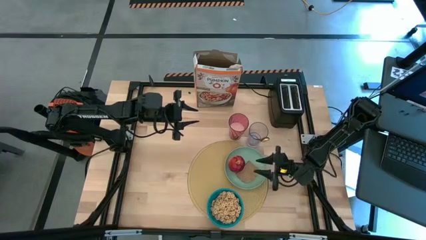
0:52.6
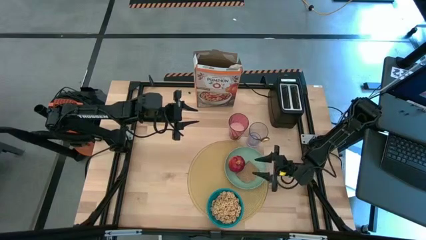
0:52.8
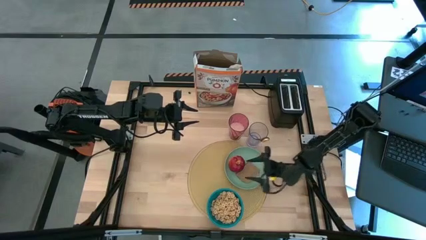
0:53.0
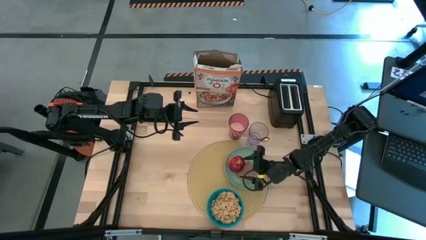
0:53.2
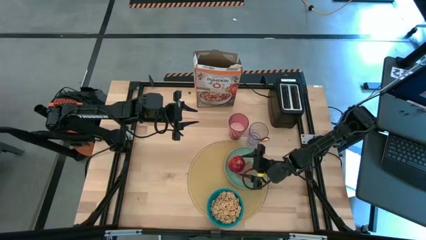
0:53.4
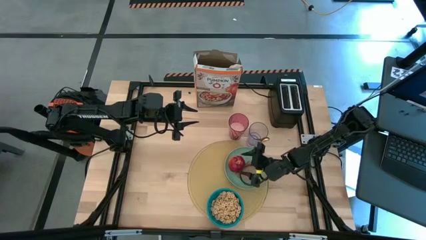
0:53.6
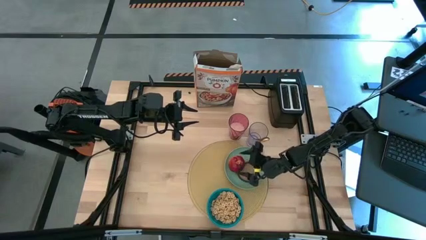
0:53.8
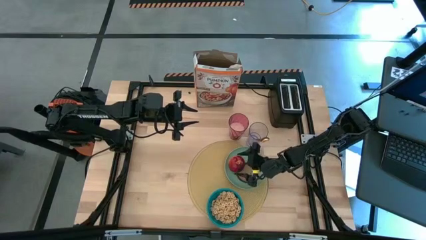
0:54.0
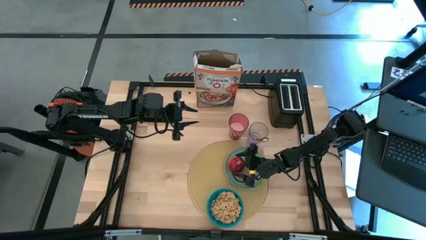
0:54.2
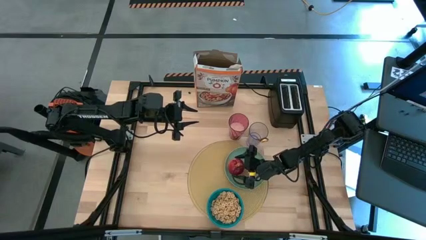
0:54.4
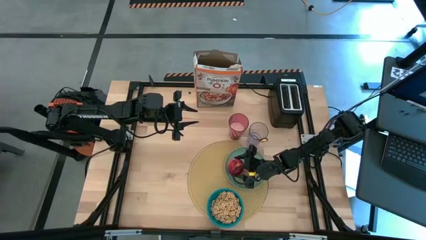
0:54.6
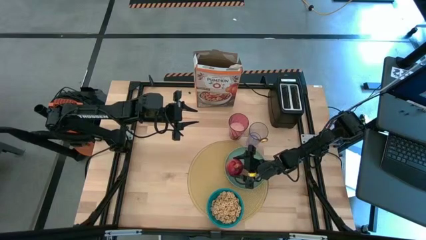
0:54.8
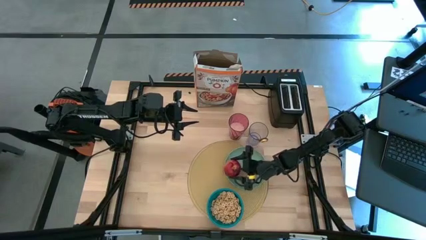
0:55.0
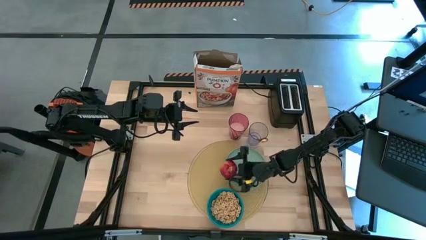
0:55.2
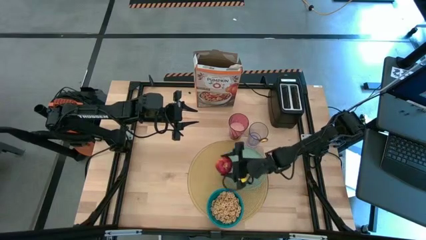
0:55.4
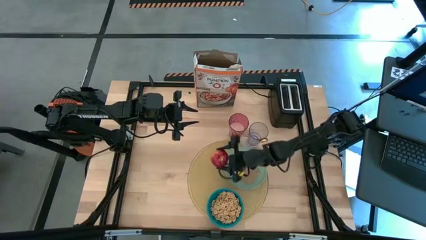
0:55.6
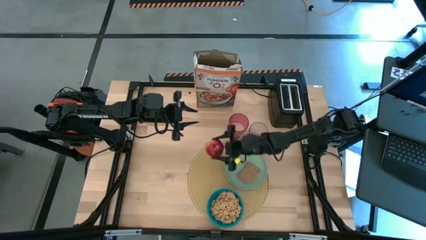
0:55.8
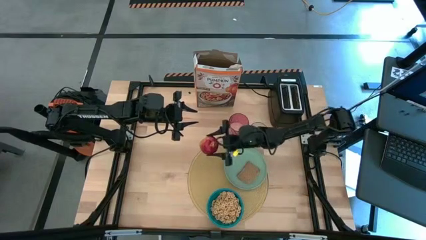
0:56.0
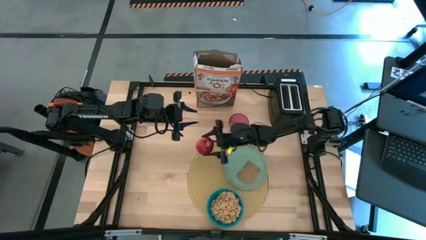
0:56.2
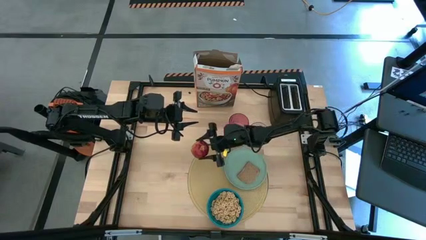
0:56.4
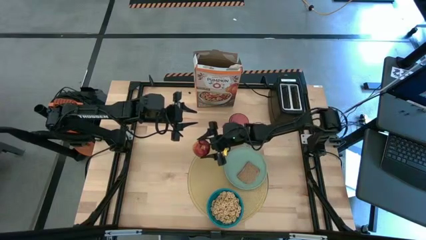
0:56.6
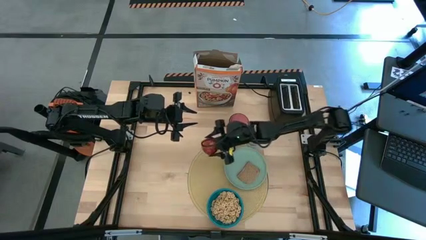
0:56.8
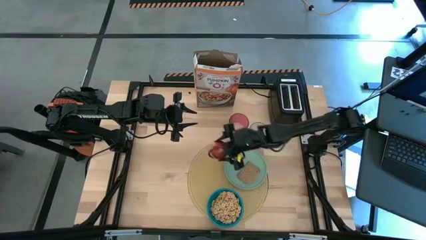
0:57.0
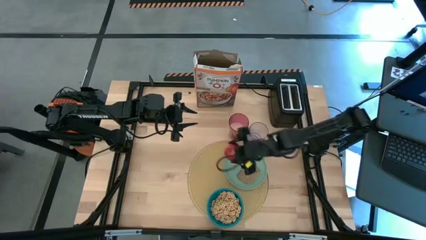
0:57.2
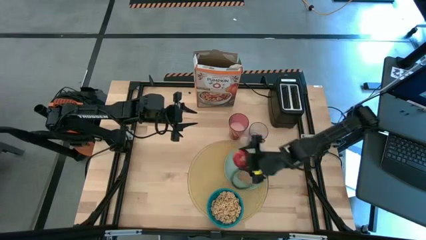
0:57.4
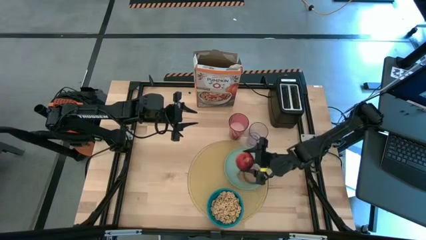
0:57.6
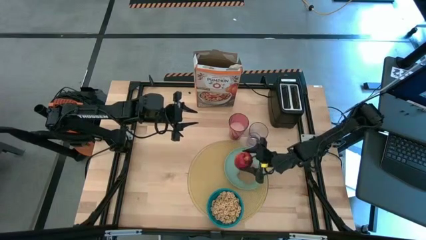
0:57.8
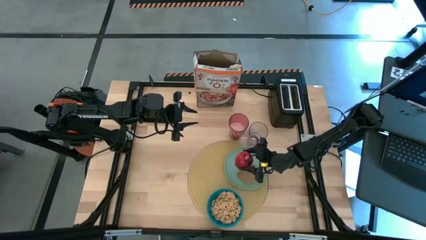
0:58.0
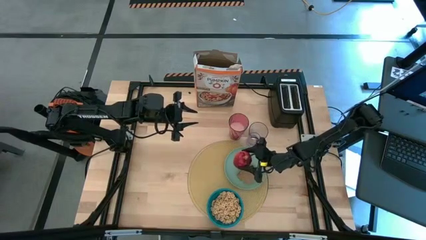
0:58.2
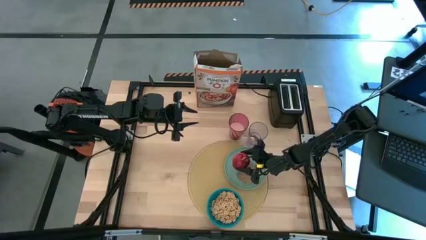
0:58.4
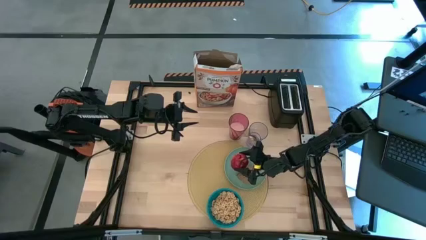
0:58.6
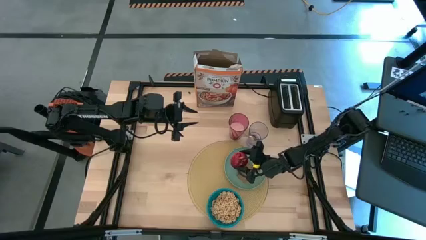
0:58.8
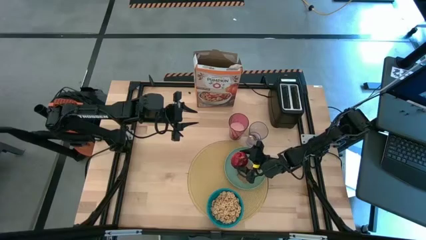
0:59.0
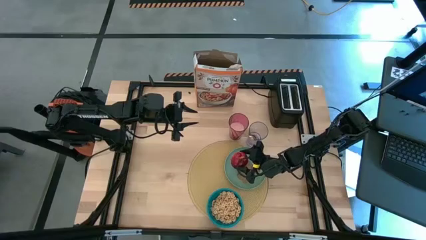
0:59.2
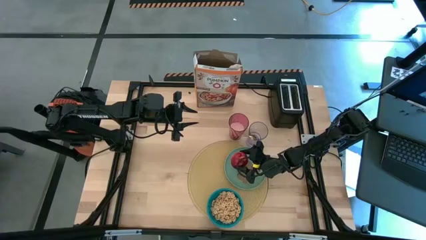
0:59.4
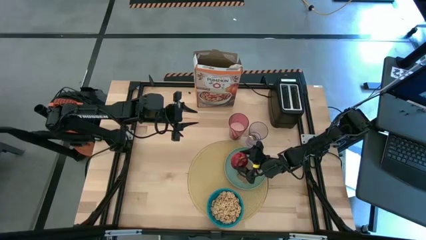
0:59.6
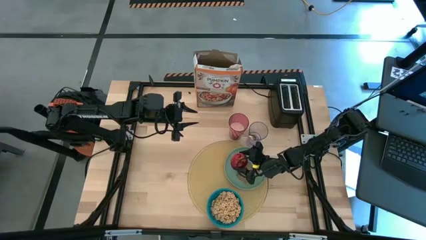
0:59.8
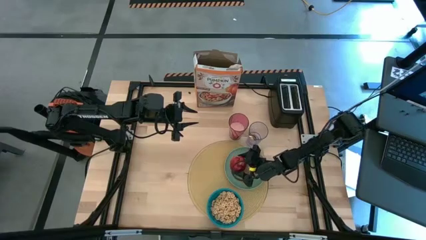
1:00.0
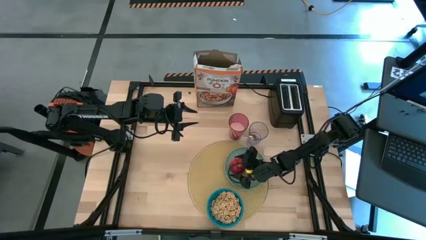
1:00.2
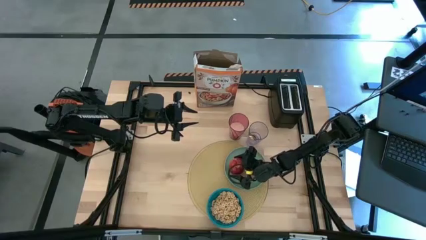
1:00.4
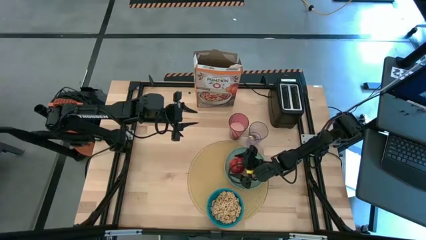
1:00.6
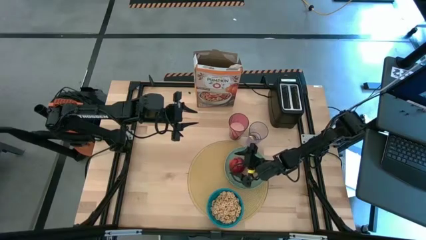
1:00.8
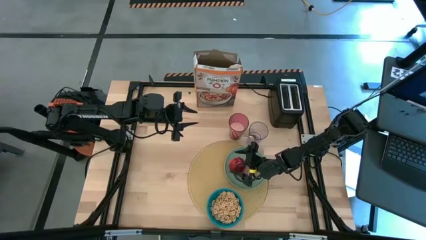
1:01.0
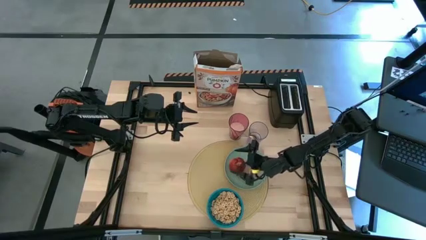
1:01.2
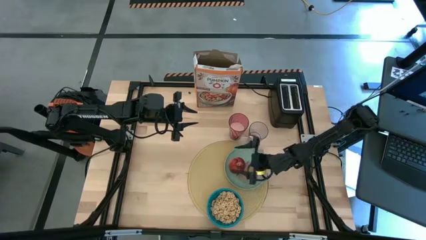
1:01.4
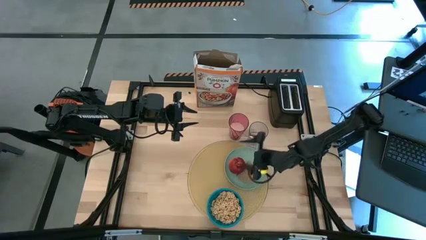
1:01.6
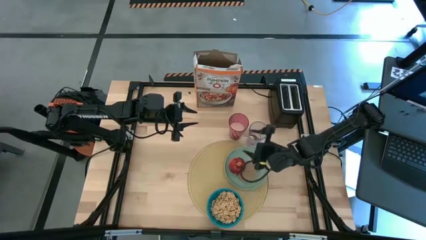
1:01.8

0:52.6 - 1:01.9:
Task: Arrange a breakfast setting
Adjust the apple on the plate

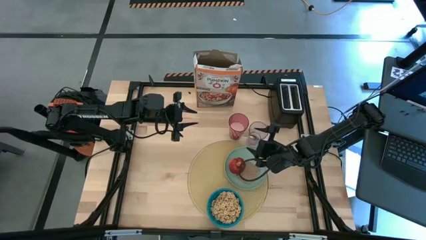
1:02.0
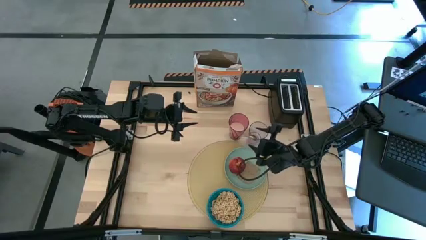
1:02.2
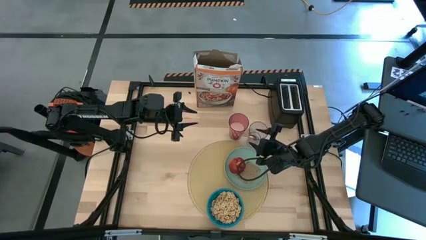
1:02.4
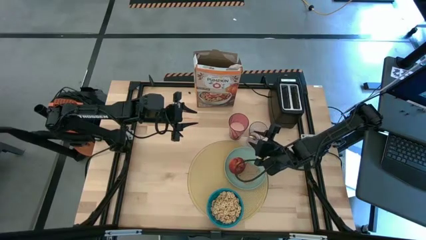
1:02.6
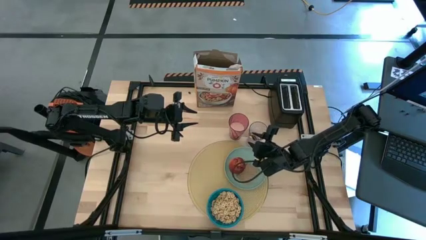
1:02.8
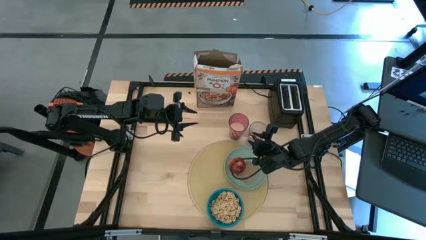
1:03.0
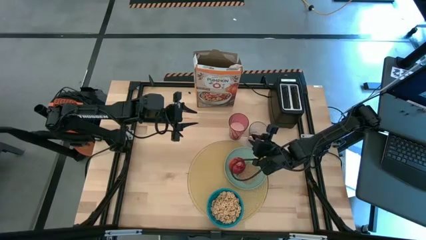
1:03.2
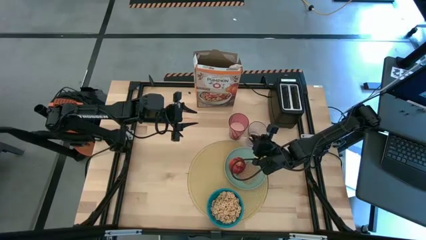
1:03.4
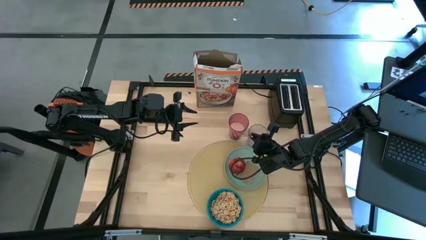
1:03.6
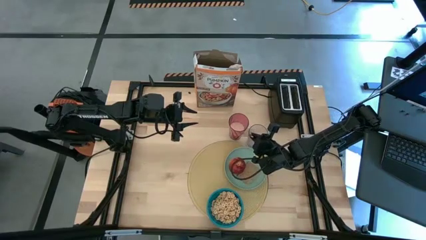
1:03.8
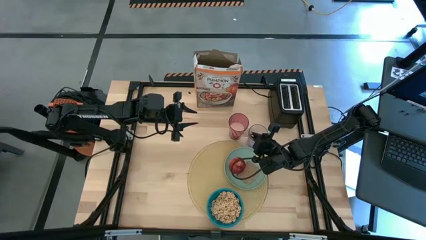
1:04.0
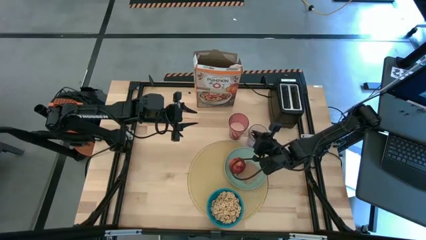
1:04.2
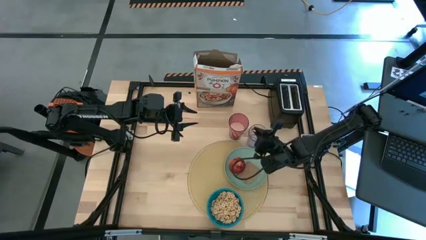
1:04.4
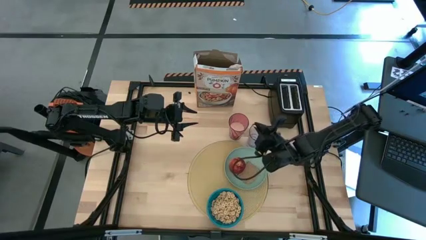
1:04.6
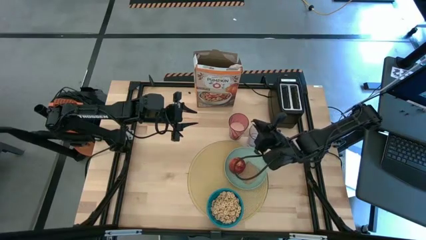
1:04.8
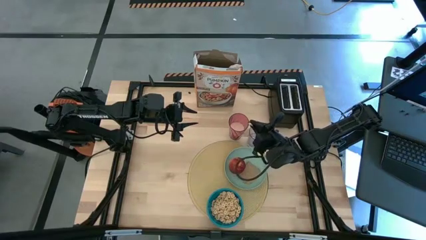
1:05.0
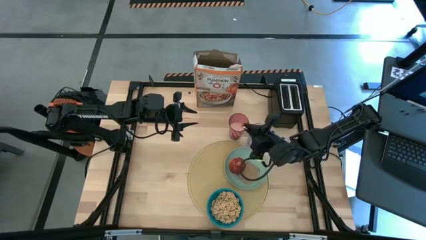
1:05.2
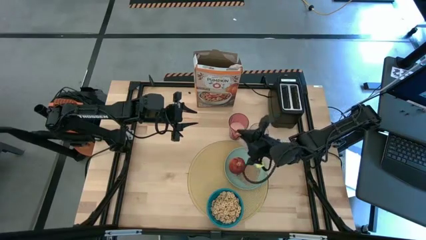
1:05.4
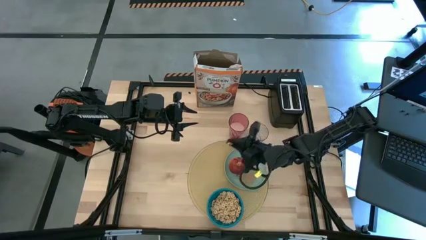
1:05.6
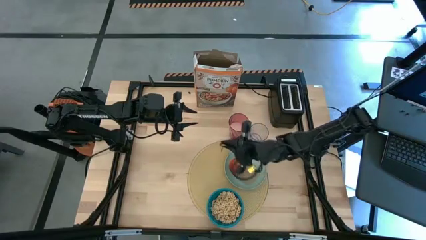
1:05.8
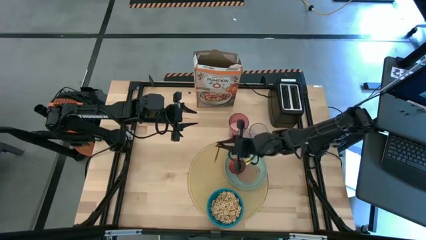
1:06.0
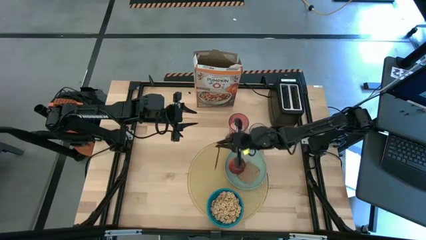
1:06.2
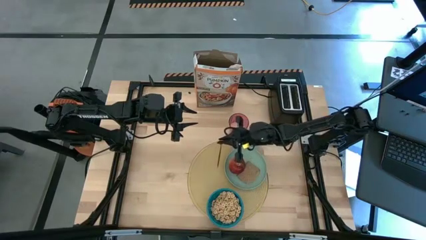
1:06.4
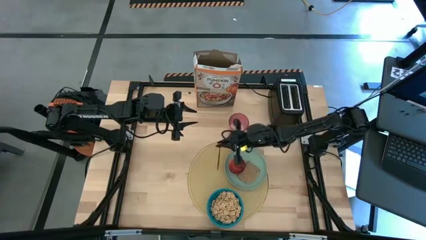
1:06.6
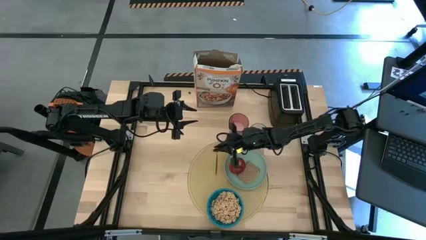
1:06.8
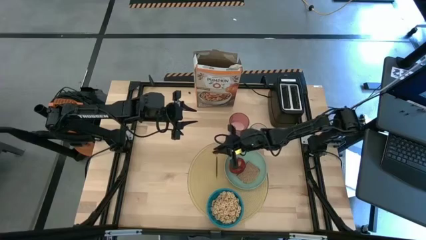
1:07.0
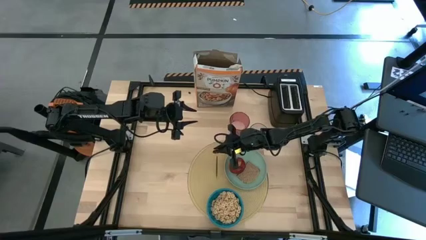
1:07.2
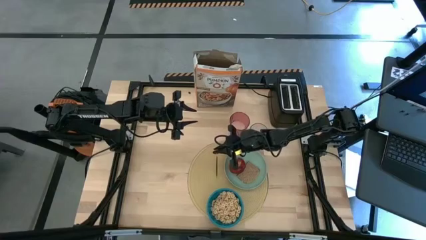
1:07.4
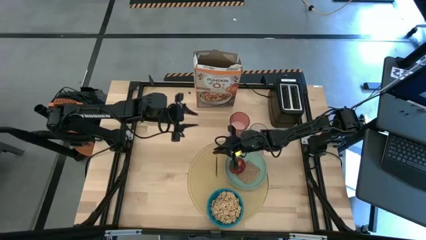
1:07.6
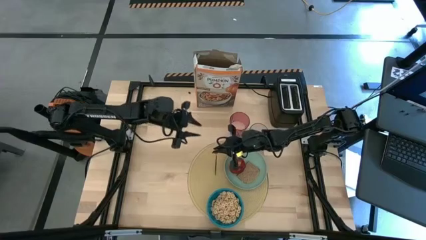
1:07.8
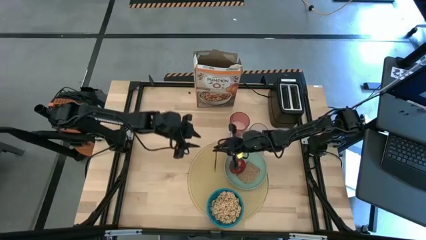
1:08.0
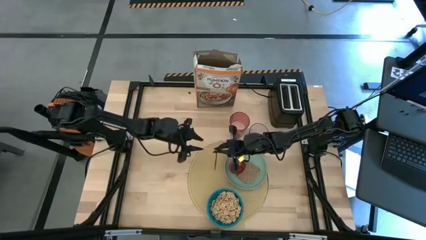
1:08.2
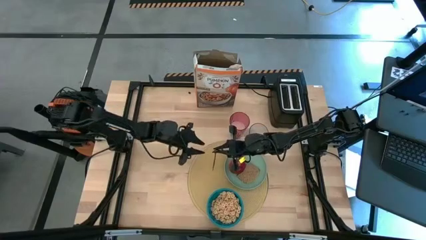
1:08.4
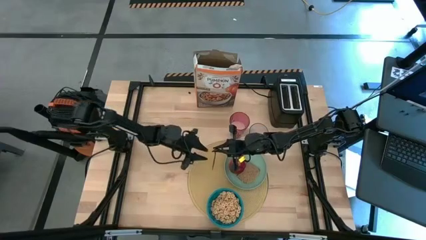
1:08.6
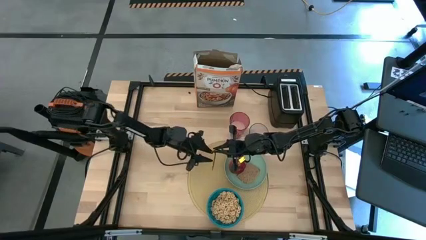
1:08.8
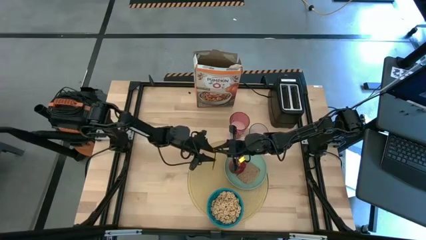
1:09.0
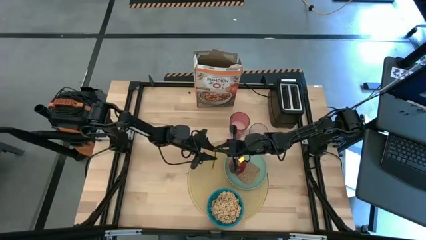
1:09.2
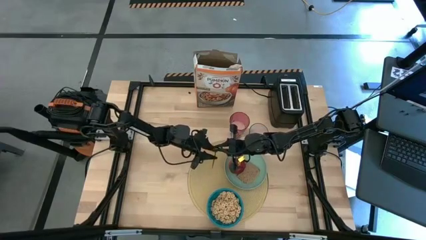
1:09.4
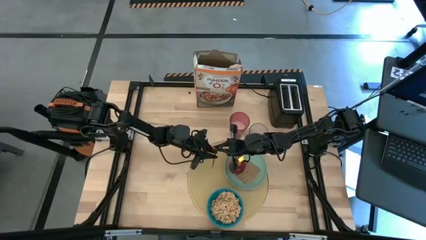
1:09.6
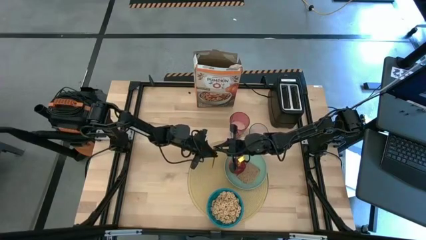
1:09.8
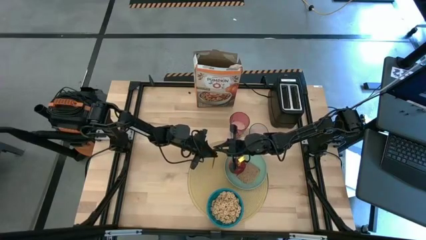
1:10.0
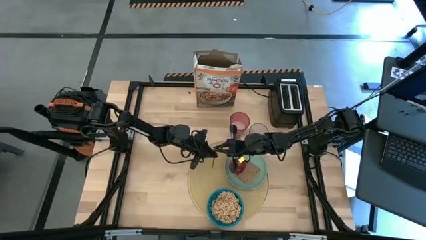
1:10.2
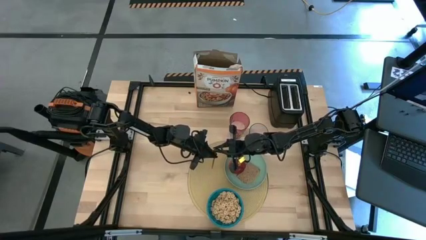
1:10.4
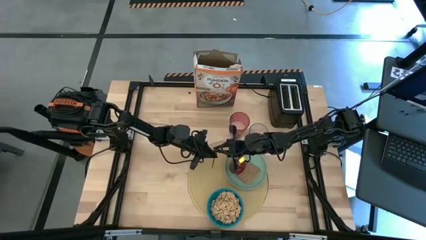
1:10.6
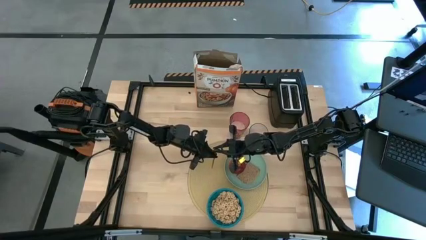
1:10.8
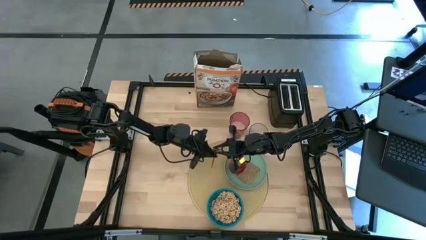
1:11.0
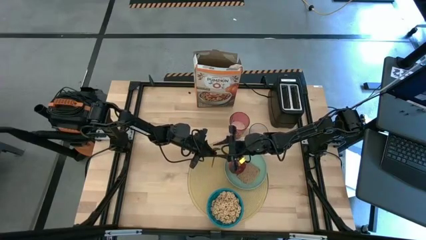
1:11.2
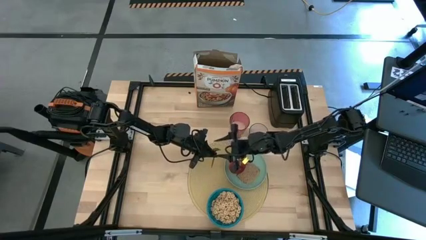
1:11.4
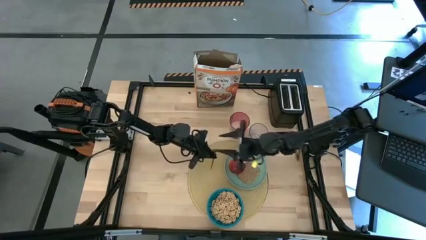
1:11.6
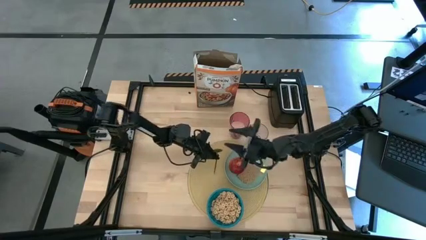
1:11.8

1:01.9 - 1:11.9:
Put the spoon on the brown table mat to the left side of the blue bowl
